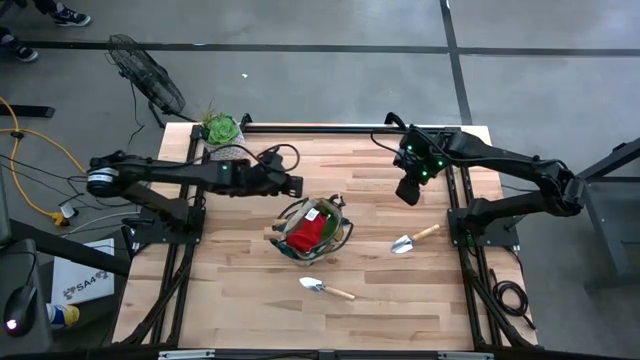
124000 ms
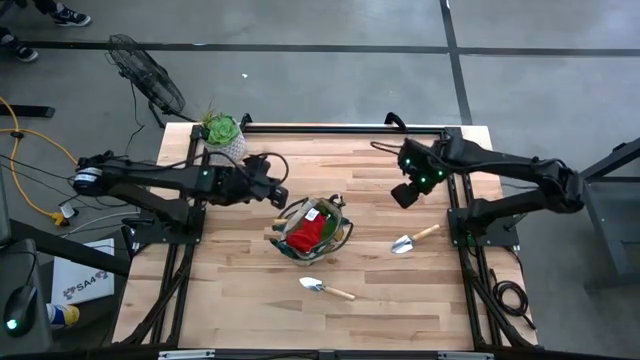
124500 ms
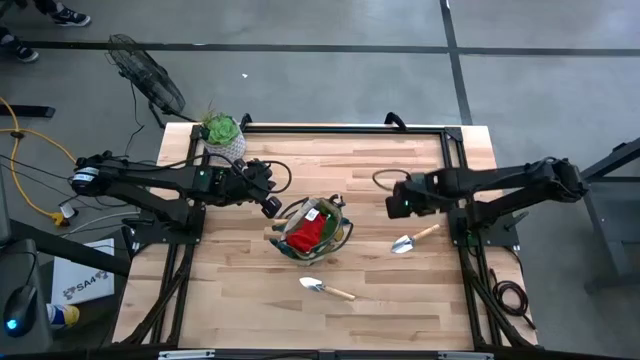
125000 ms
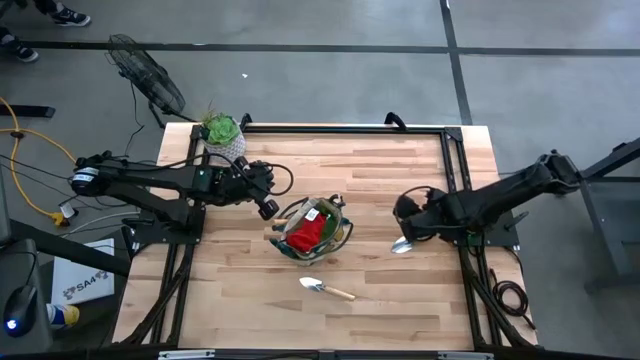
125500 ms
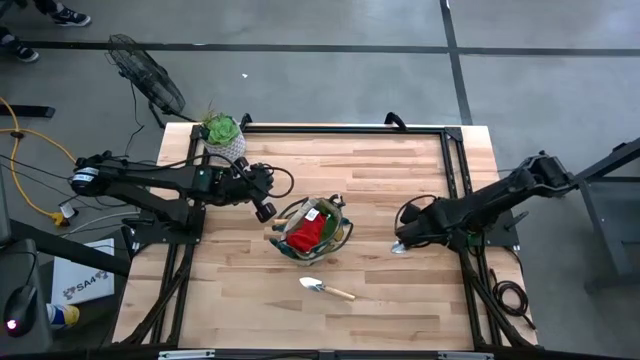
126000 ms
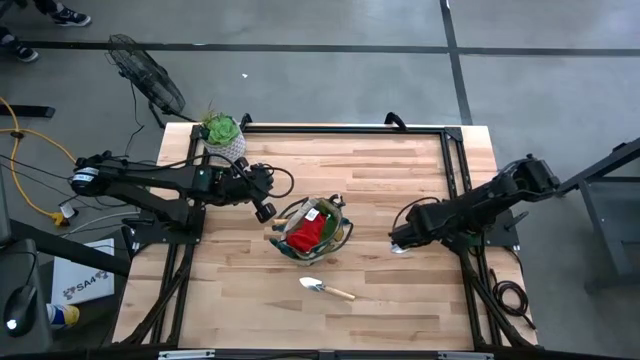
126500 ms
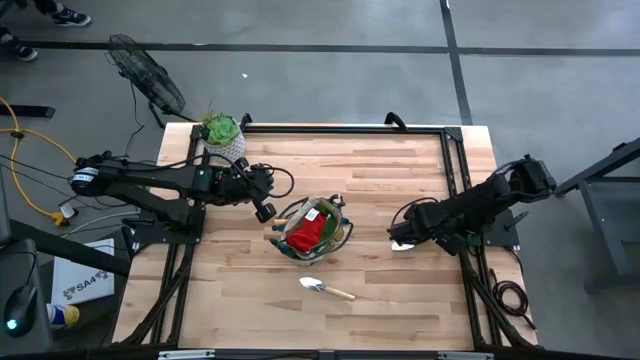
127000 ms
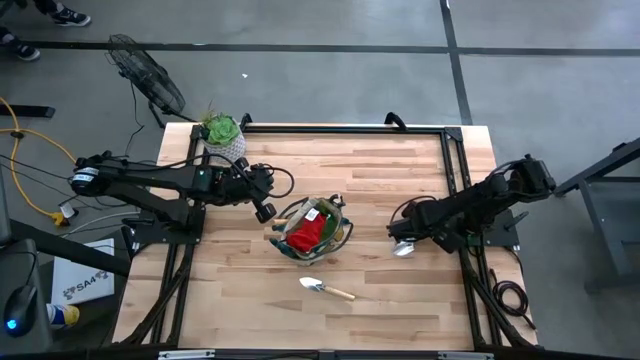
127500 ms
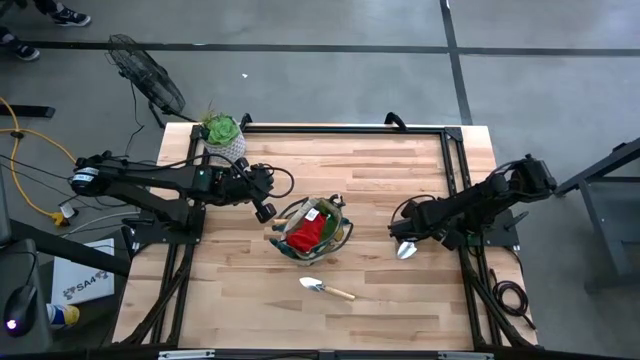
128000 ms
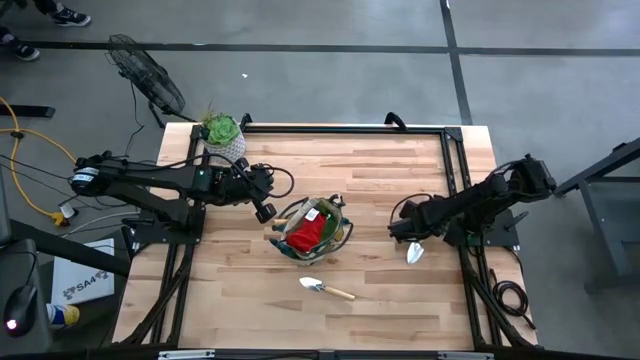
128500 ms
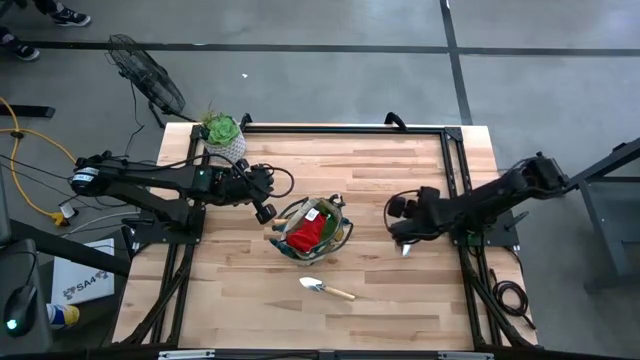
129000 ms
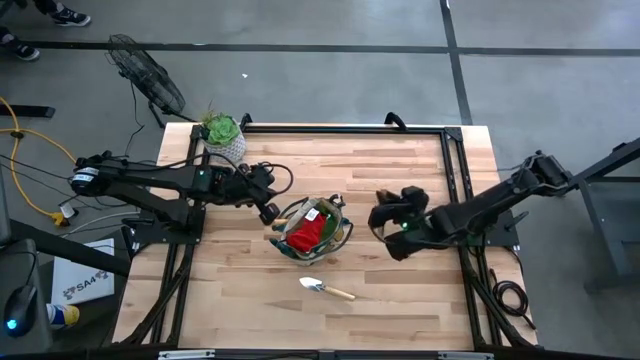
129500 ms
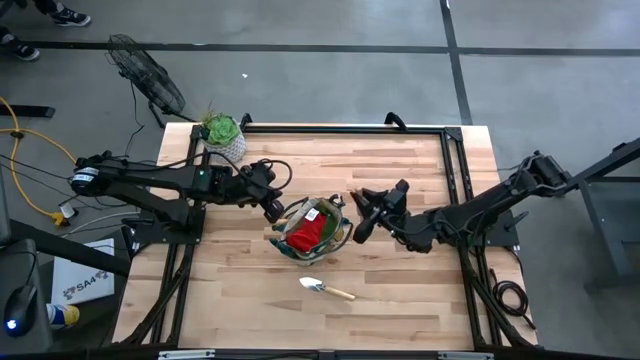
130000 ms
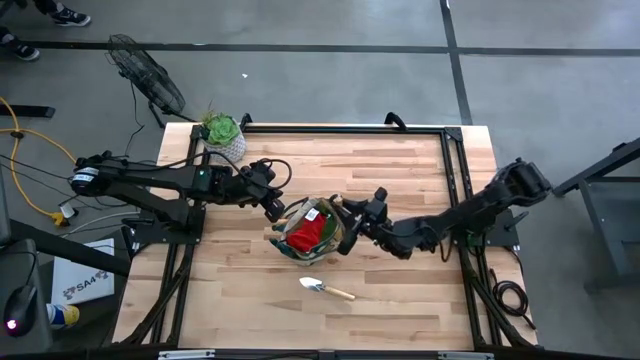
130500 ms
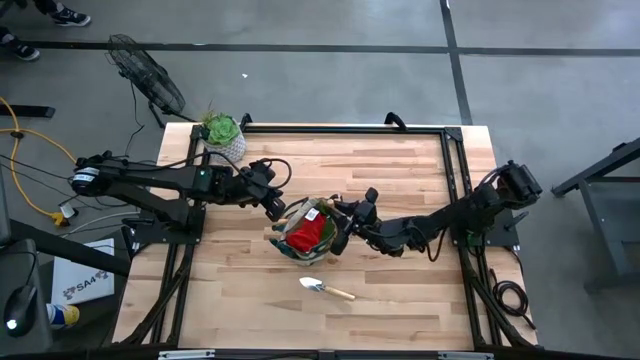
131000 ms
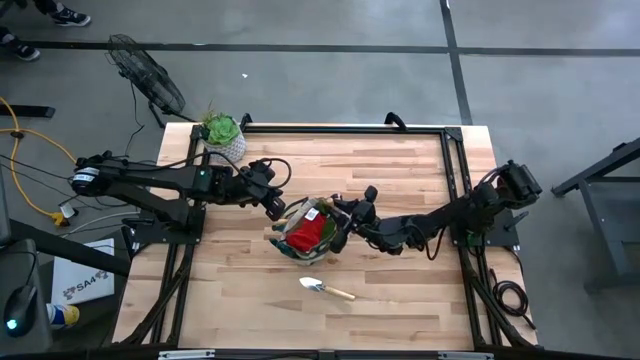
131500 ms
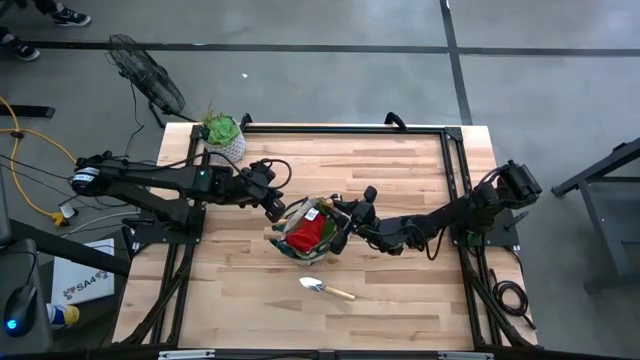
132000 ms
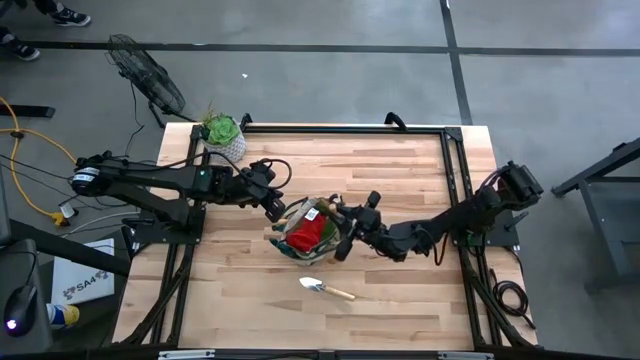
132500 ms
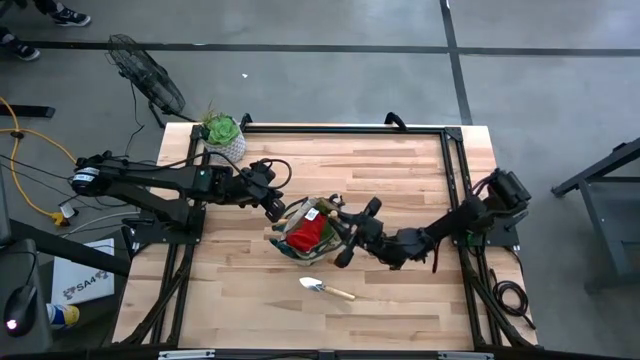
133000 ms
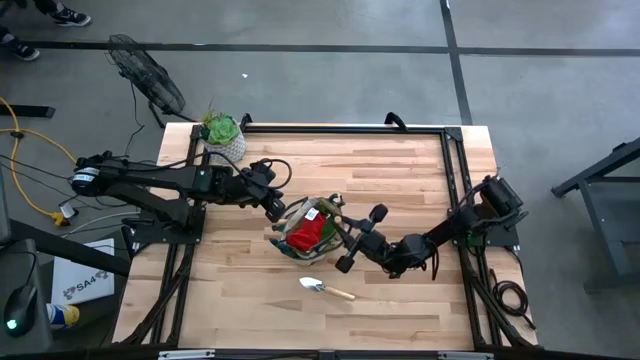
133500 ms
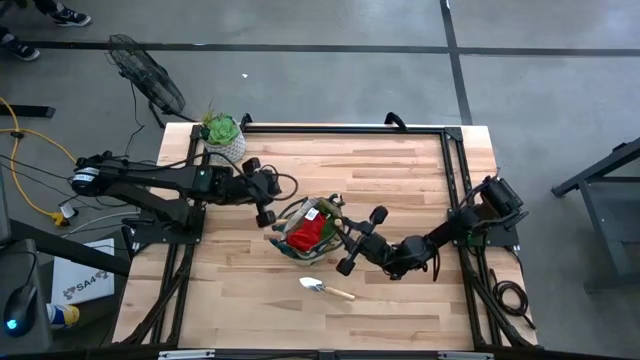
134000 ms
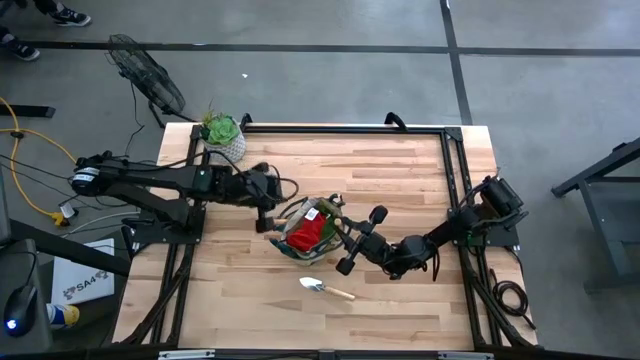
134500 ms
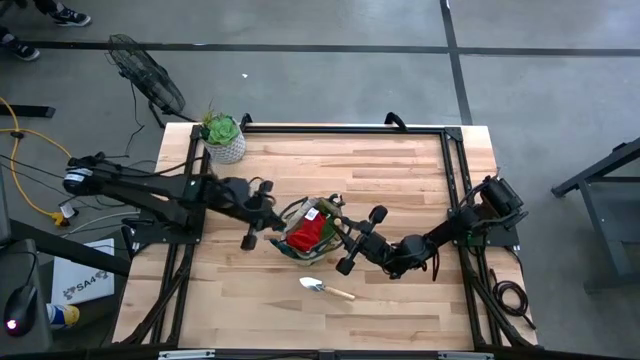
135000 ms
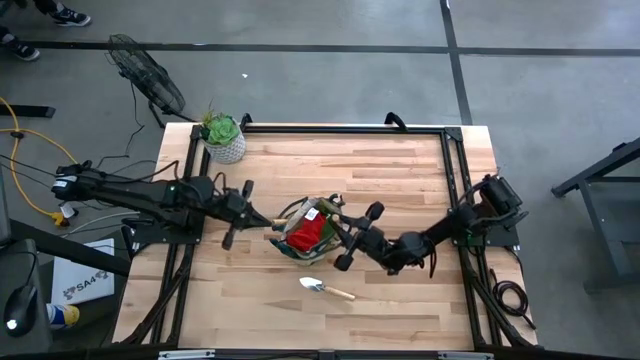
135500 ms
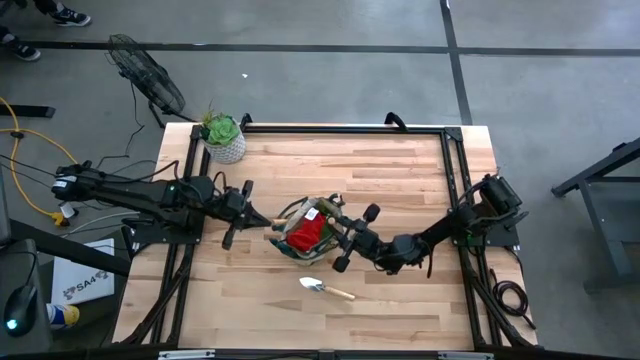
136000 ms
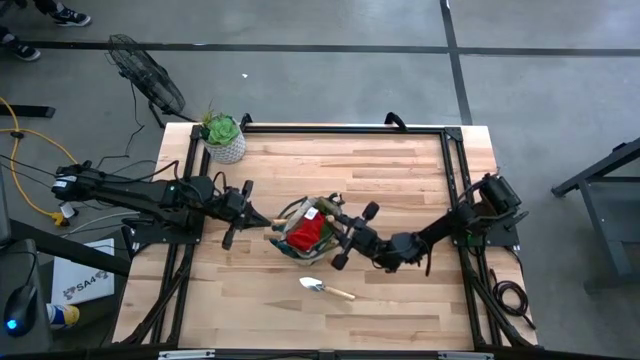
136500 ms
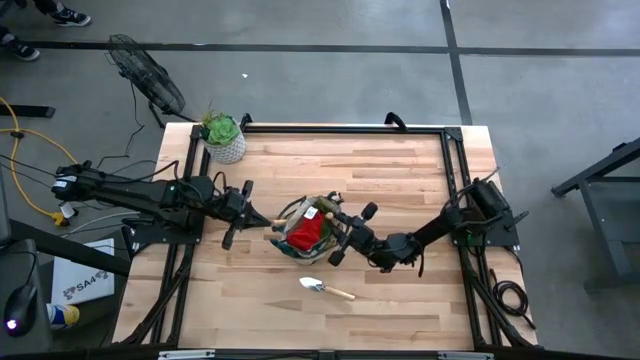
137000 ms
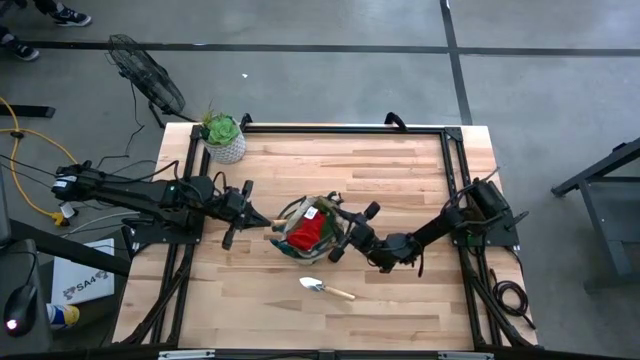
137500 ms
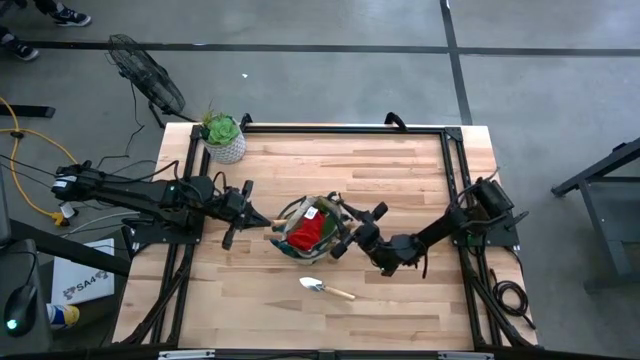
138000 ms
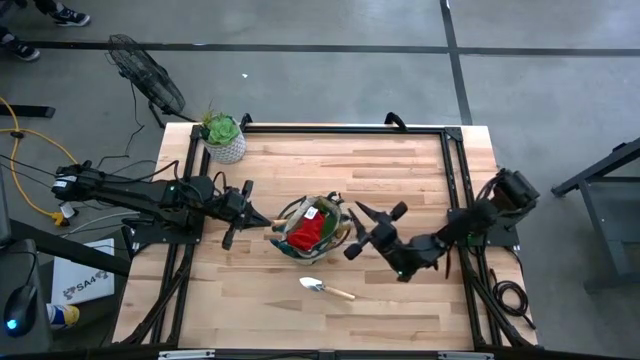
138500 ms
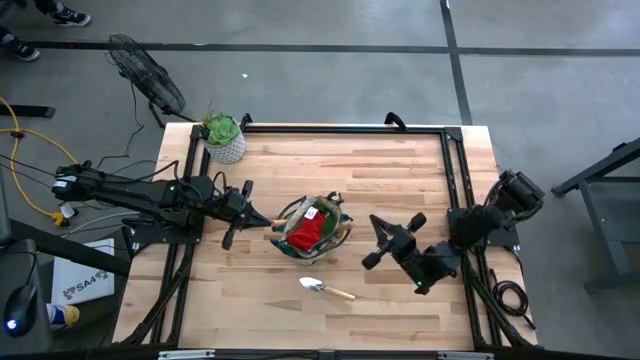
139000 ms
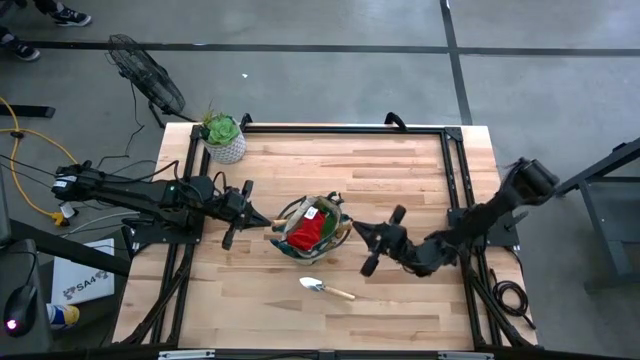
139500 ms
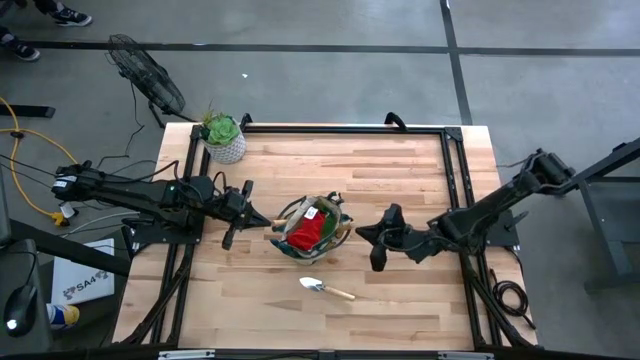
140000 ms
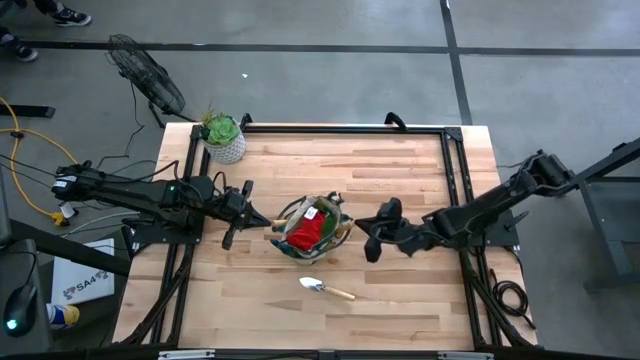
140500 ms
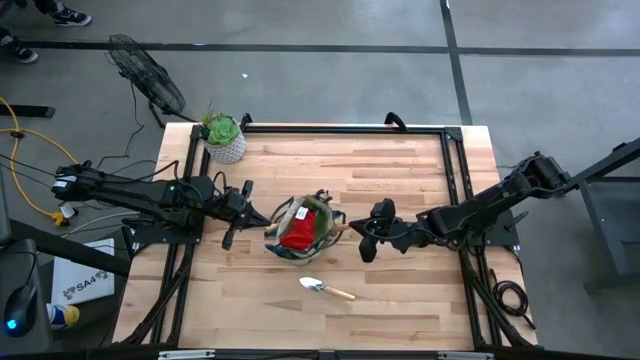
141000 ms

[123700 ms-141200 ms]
Task: Pick & Place Garden tools in Gardening bag
Put the top trowel into the gardening bag
